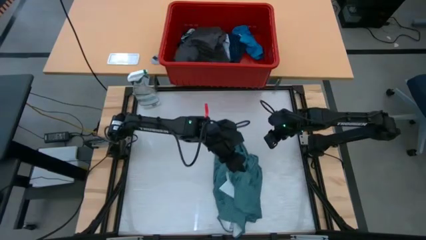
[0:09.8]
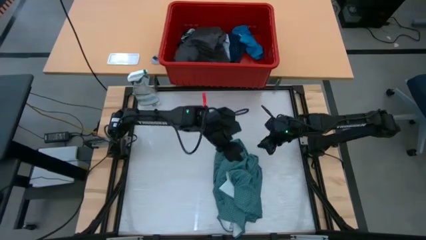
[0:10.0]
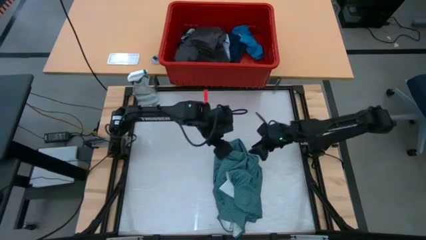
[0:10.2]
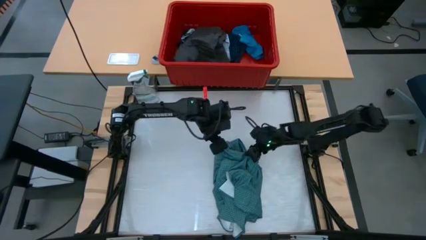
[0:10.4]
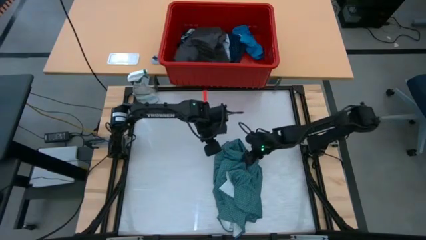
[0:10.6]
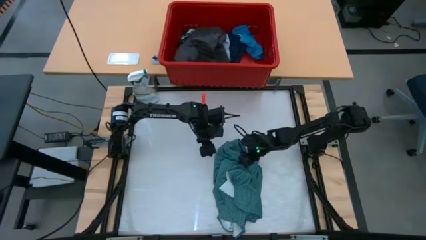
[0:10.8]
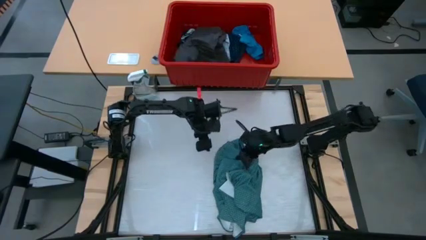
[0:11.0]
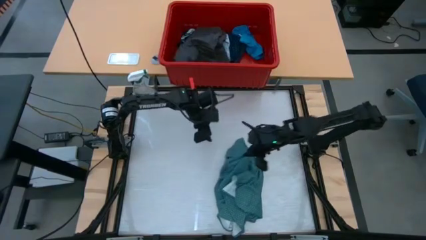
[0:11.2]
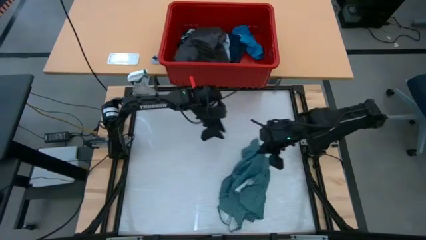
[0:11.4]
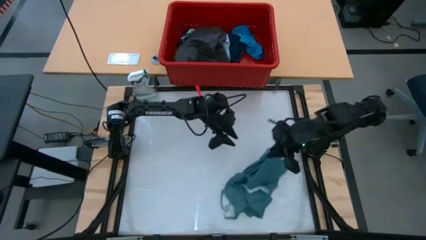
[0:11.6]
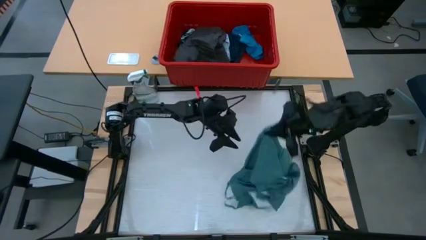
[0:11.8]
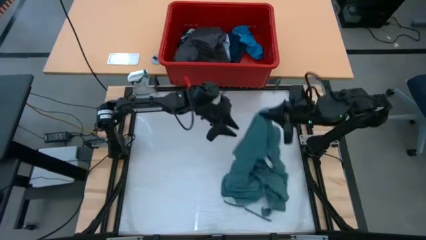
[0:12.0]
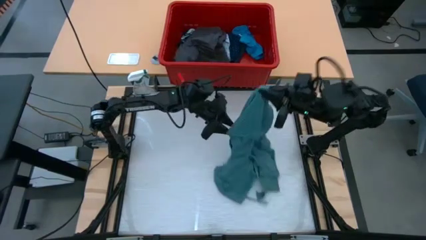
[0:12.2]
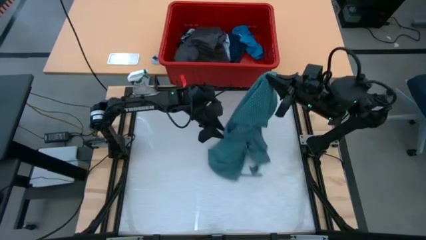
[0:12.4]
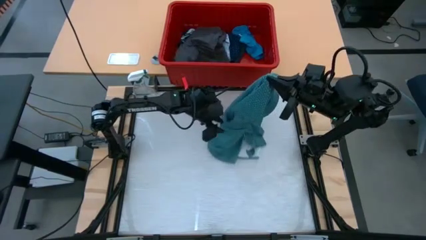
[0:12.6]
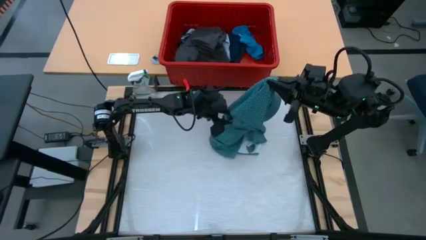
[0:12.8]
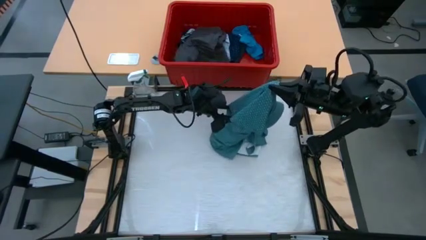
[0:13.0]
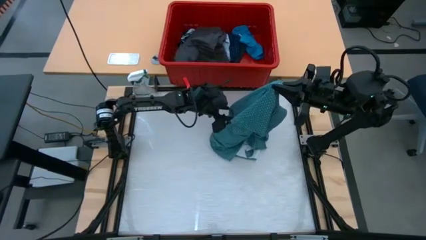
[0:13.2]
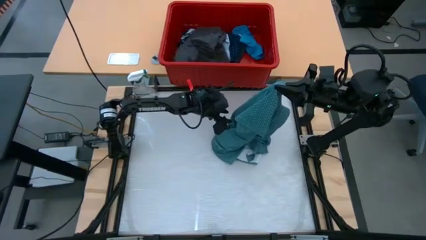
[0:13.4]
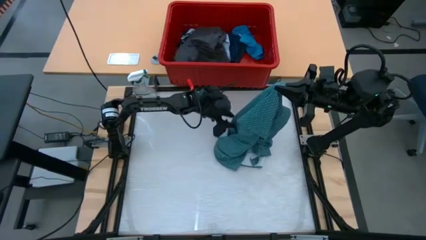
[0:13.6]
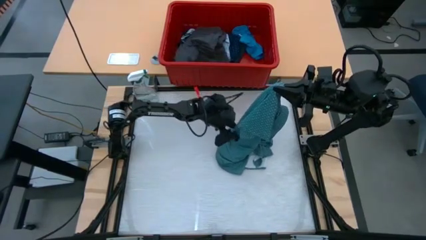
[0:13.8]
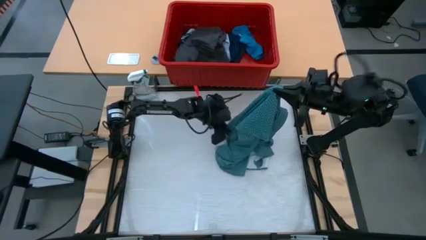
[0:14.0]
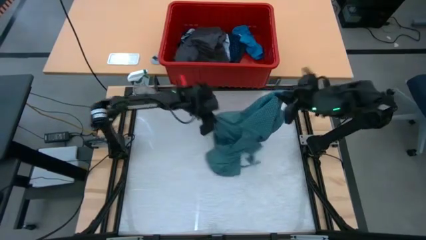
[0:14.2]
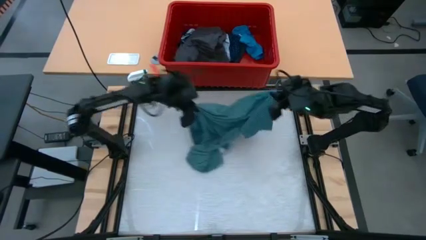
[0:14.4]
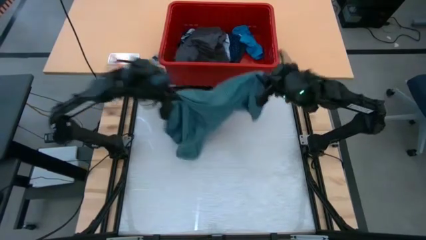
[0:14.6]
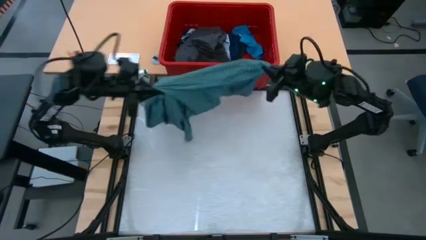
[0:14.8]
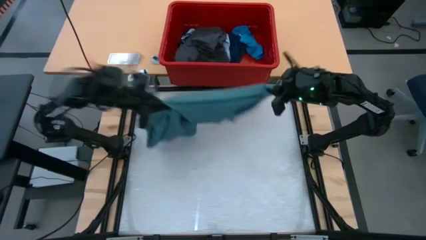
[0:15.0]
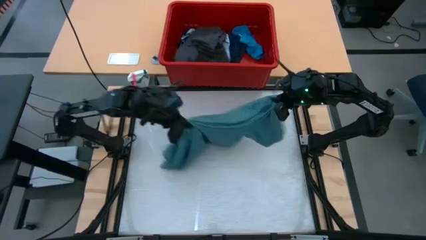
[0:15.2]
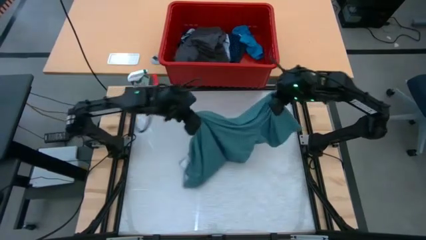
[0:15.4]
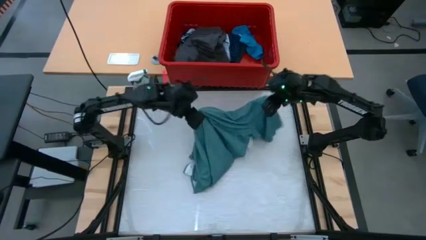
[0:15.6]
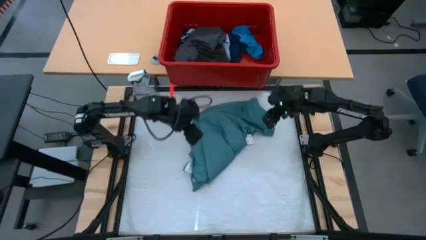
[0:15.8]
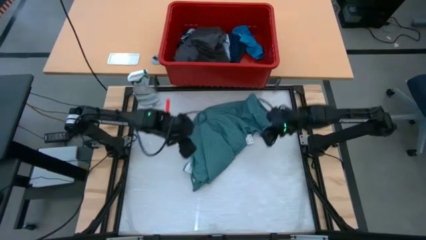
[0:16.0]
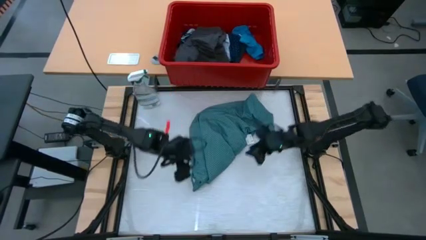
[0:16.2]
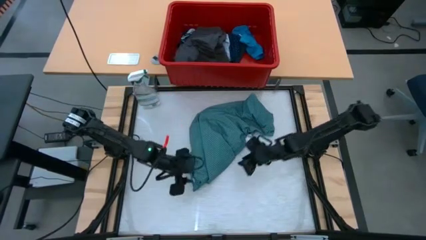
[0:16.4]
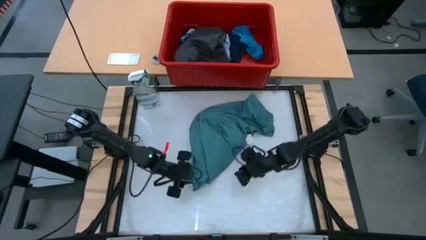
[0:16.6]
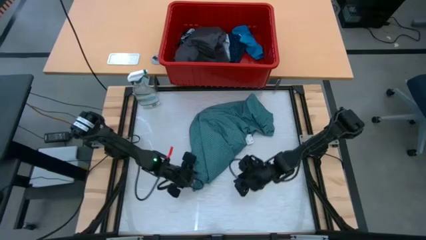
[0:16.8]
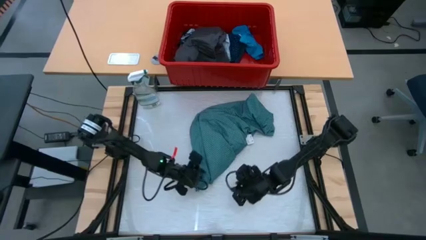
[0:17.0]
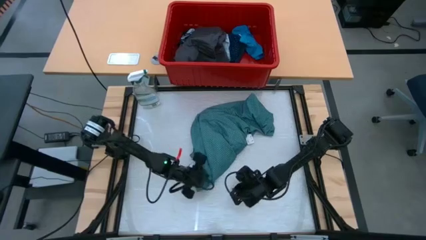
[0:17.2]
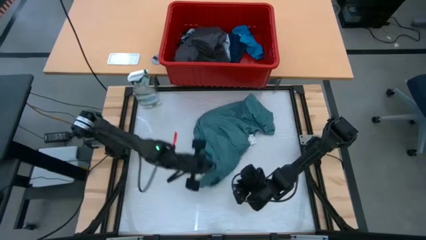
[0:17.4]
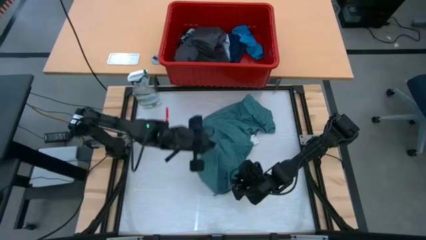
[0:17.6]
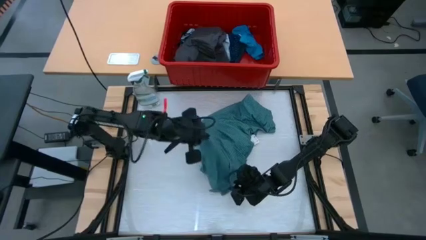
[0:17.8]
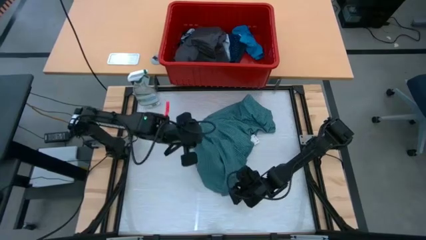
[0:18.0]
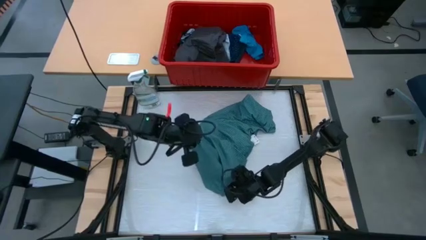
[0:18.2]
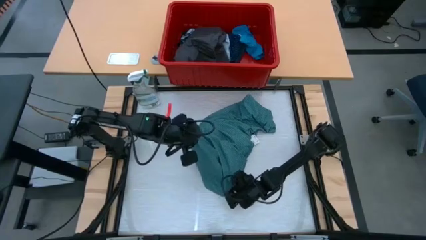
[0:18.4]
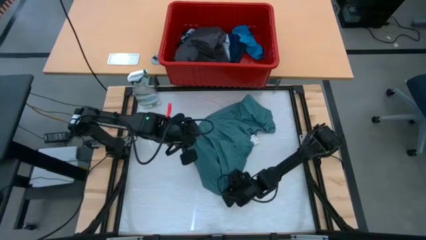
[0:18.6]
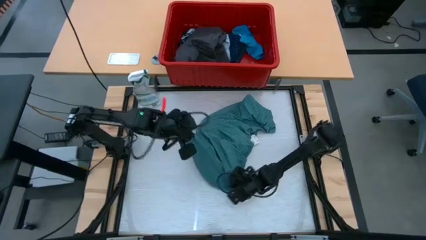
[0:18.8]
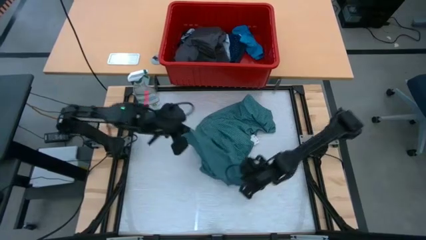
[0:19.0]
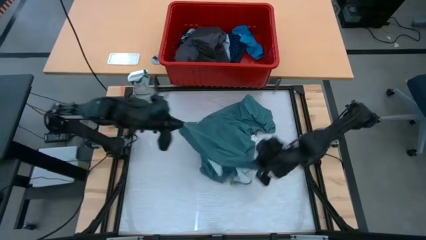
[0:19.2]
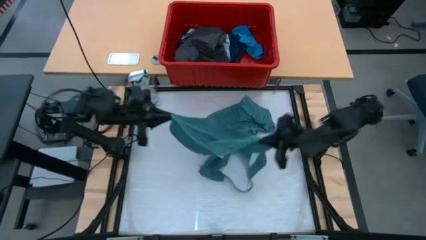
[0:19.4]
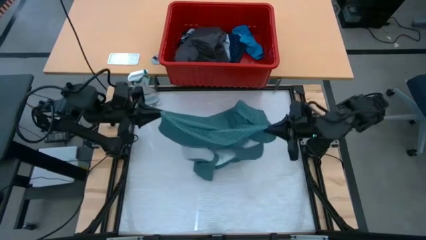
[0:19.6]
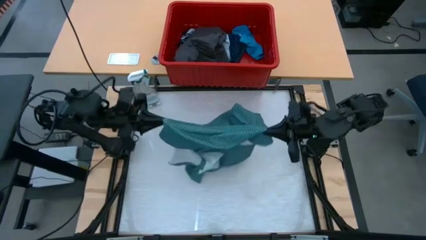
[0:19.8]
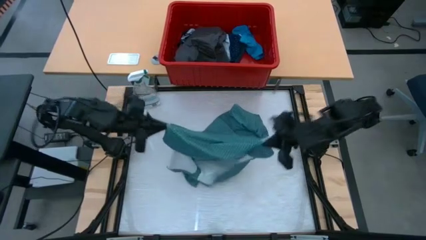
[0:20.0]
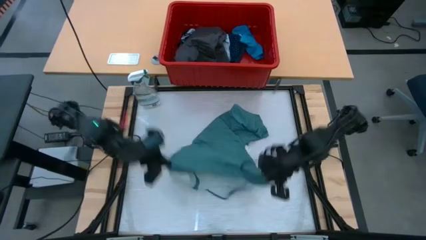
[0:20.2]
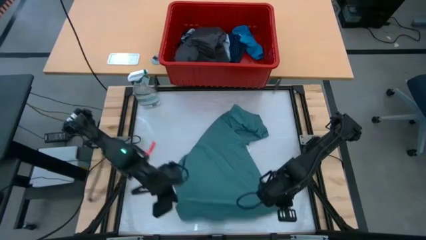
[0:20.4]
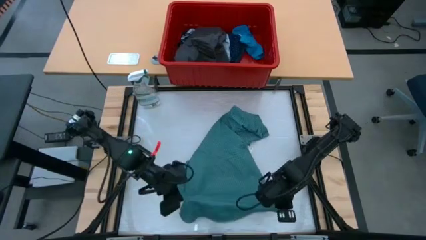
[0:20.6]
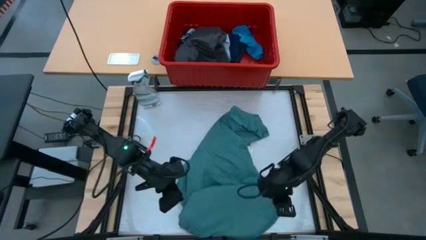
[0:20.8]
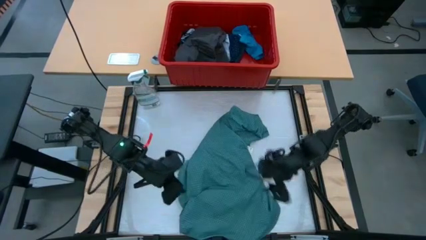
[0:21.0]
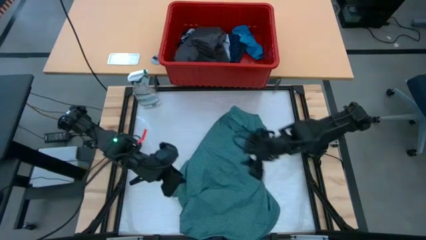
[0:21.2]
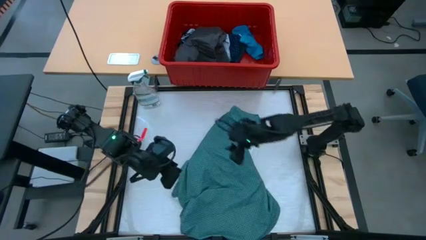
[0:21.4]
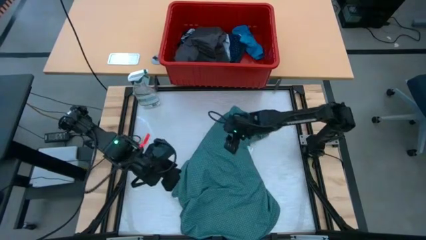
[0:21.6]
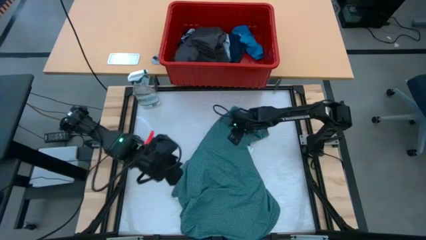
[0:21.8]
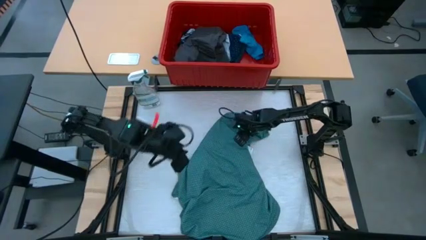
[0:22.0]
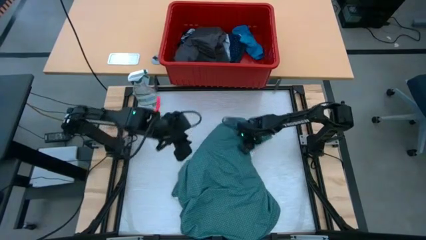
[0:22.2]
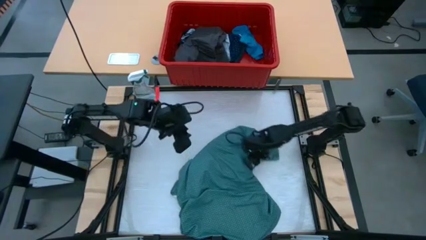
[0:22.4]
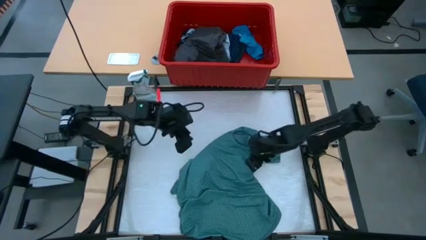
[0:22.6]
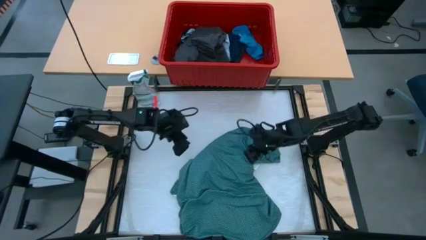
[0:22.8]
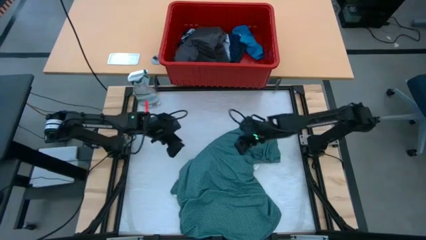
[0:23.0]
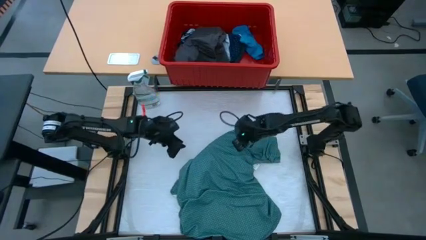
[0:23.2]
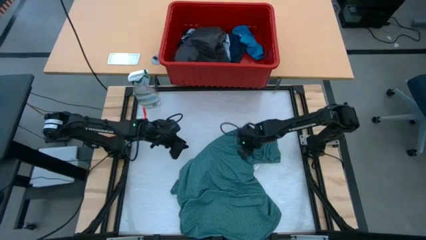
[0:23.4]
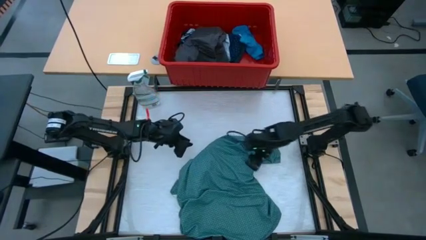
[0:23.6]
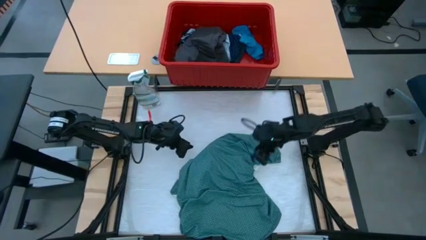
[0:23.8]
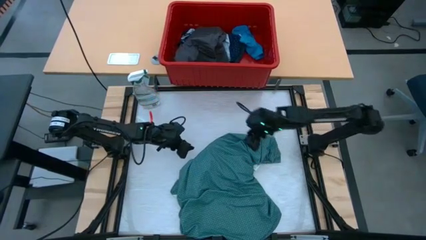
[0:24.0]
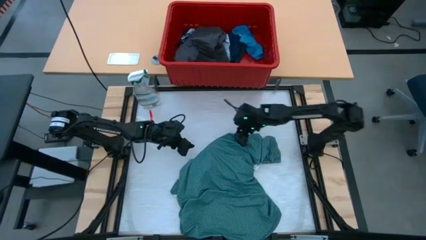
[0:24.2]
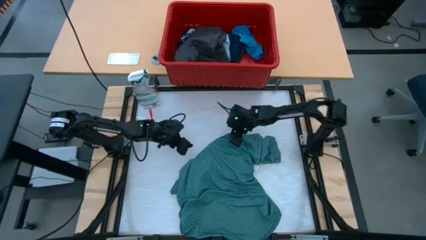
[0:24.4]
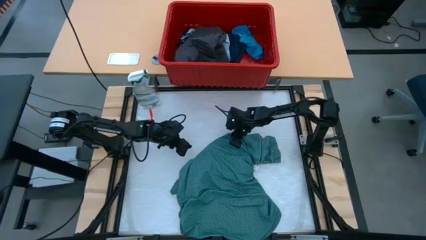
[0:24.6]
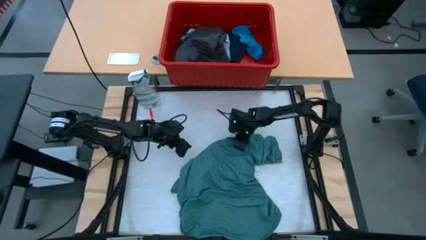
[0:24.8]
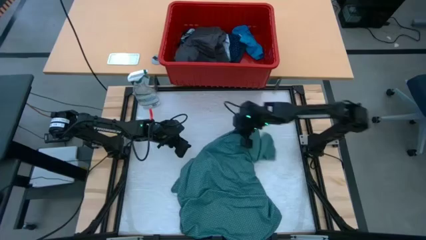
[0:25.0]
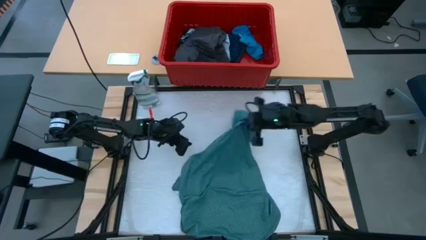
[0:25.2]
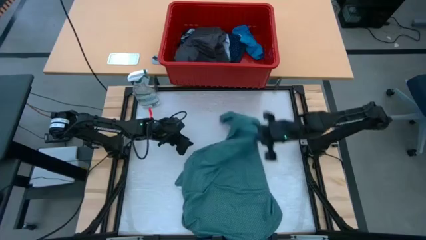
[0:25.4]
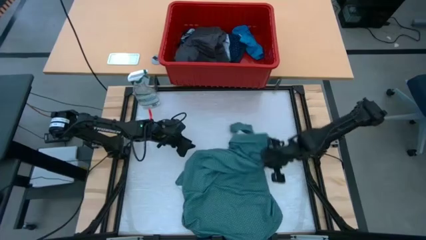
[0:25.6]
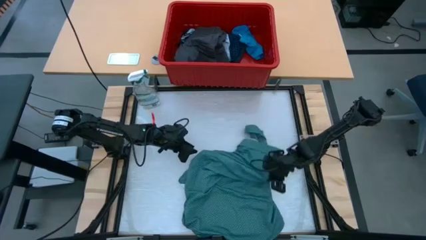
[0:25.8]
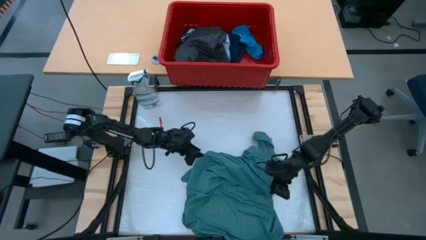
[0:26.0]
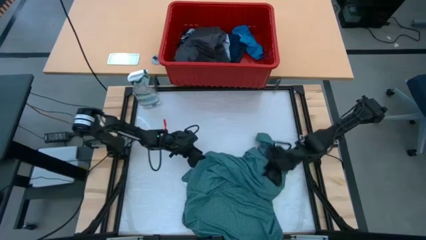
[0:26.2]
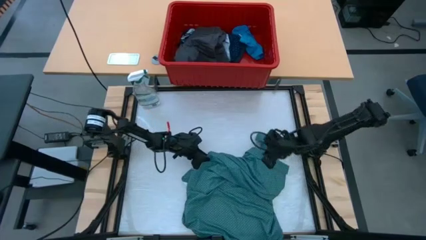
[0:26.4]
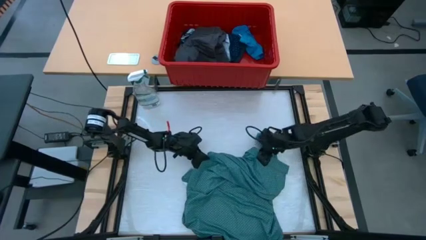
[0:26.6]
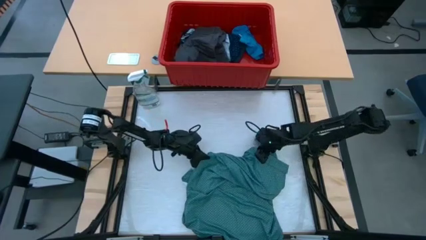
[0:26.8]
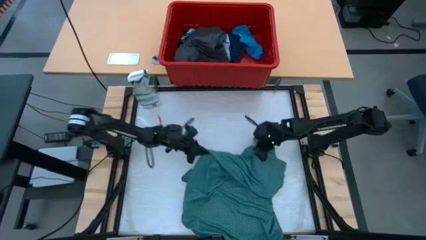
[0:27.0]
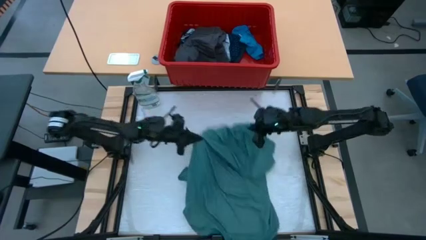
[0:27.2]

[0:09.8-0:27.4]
Task: Fold laundry
Fold the green shirt
